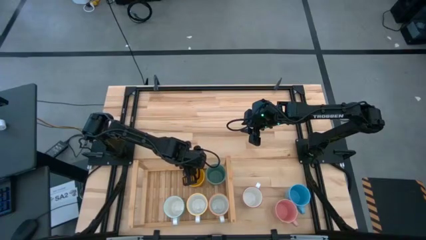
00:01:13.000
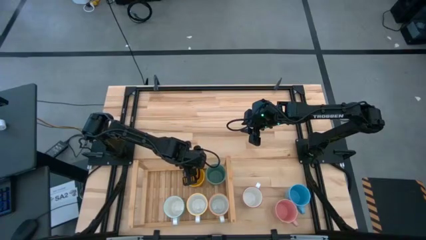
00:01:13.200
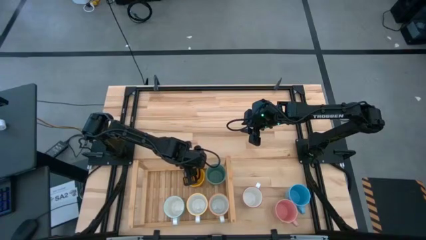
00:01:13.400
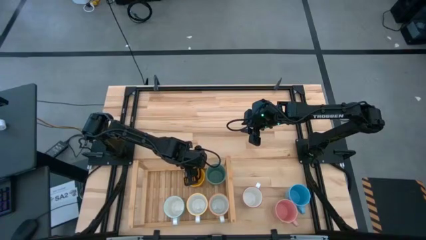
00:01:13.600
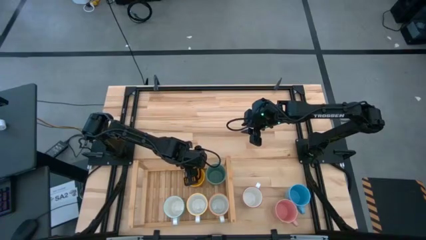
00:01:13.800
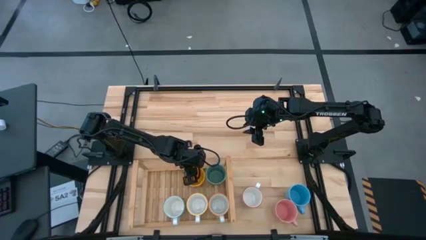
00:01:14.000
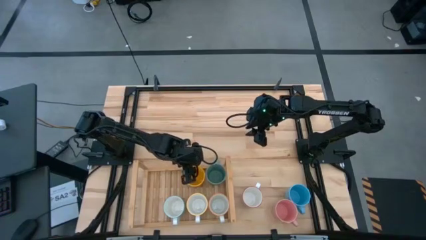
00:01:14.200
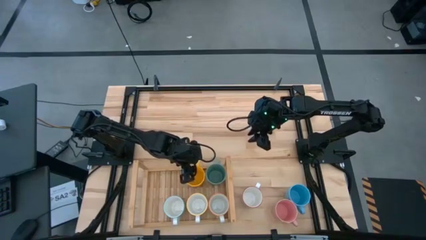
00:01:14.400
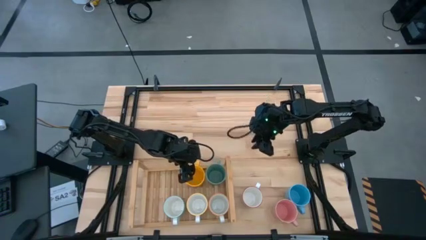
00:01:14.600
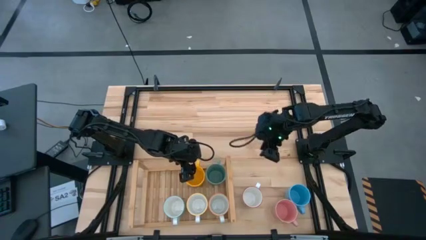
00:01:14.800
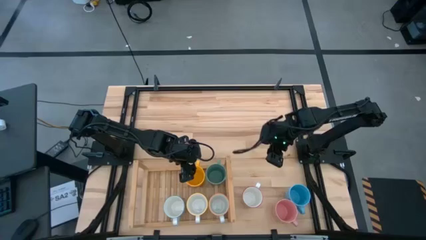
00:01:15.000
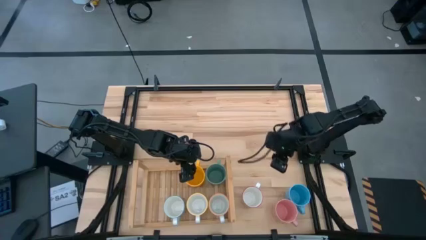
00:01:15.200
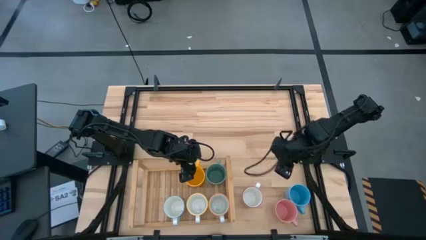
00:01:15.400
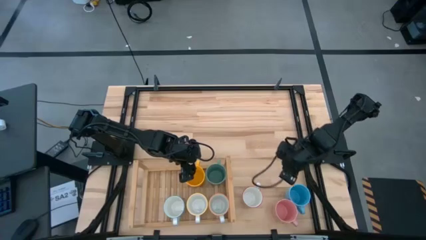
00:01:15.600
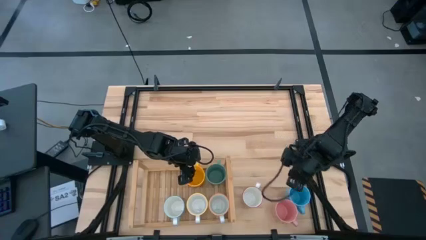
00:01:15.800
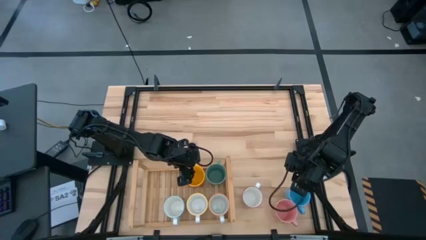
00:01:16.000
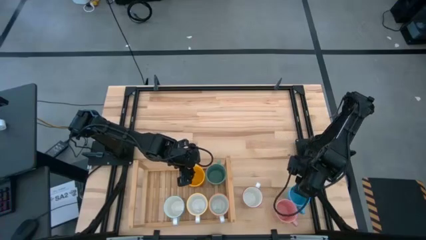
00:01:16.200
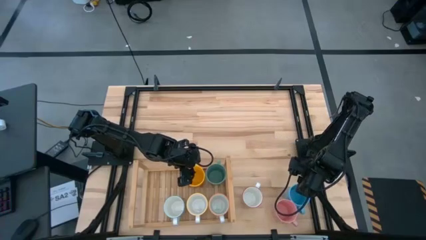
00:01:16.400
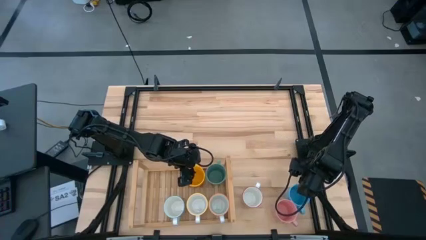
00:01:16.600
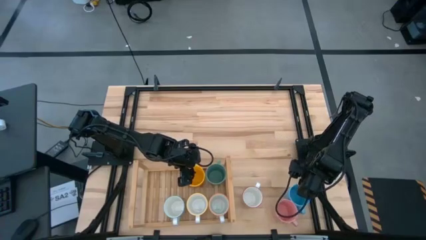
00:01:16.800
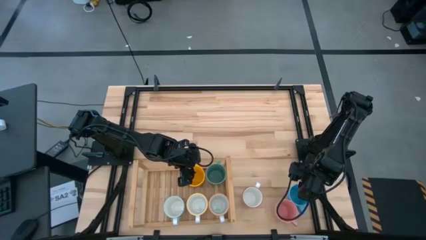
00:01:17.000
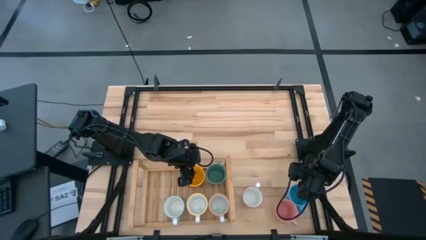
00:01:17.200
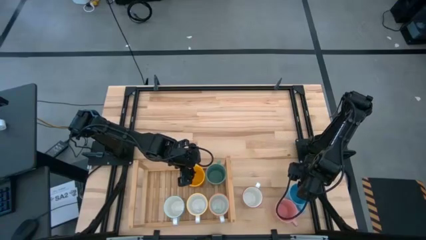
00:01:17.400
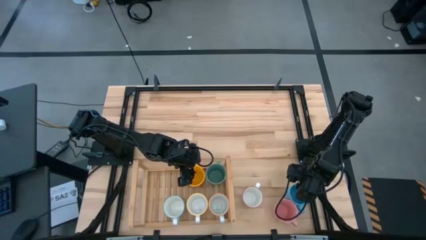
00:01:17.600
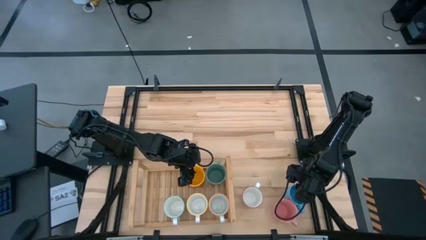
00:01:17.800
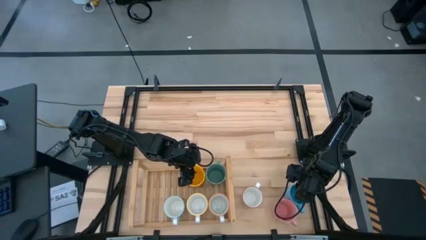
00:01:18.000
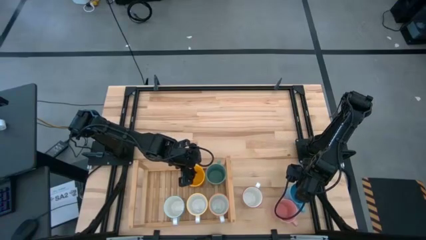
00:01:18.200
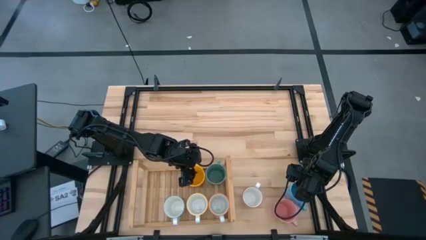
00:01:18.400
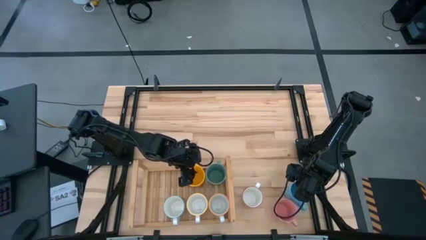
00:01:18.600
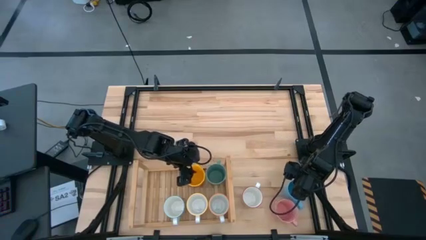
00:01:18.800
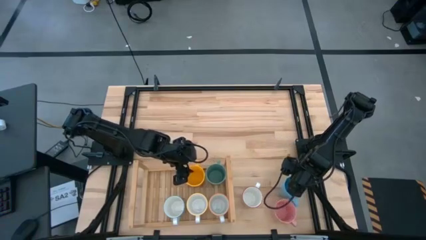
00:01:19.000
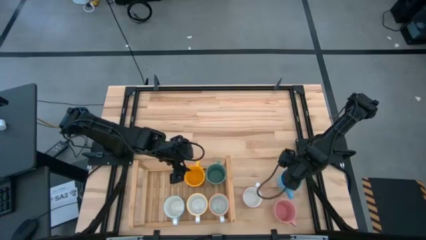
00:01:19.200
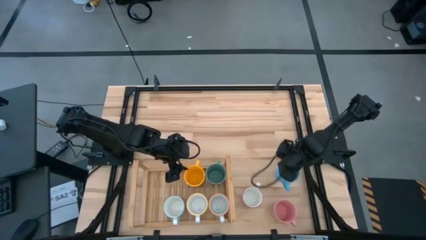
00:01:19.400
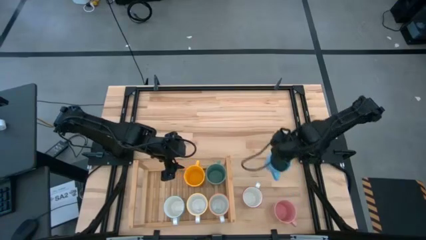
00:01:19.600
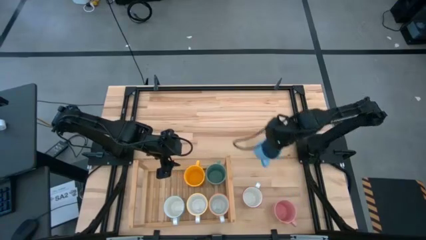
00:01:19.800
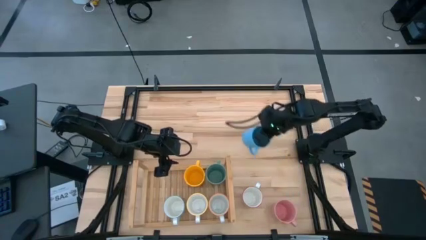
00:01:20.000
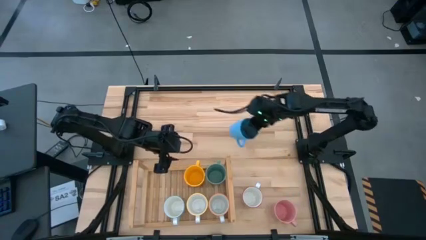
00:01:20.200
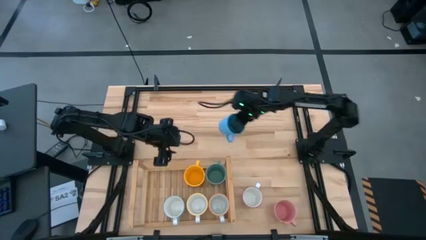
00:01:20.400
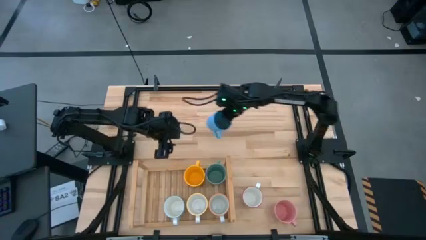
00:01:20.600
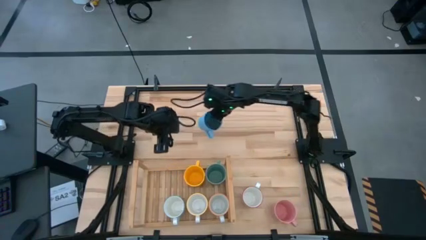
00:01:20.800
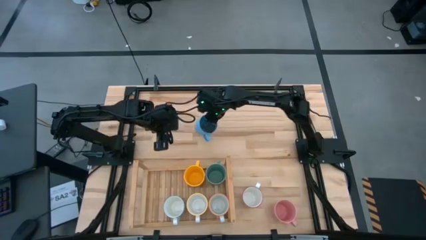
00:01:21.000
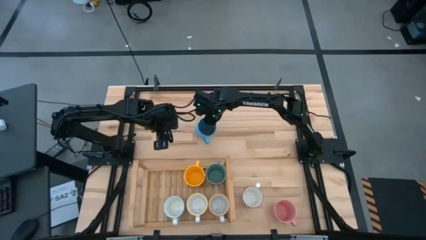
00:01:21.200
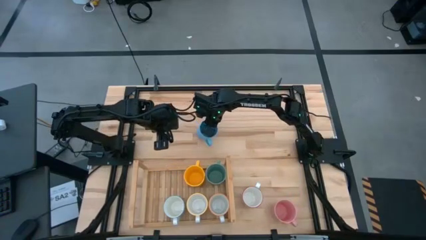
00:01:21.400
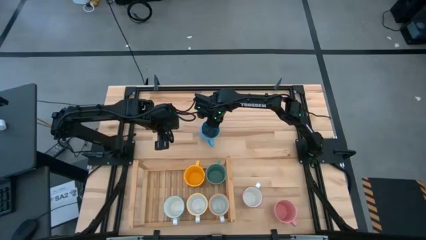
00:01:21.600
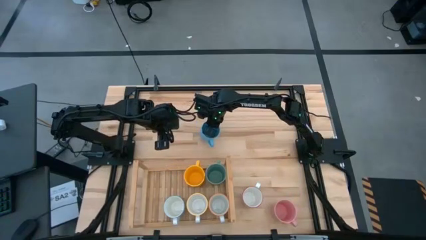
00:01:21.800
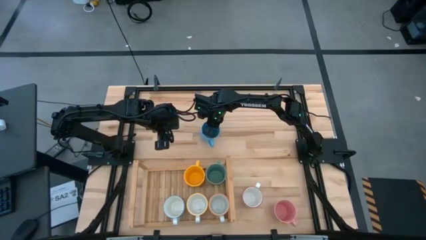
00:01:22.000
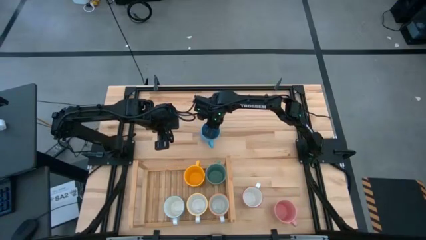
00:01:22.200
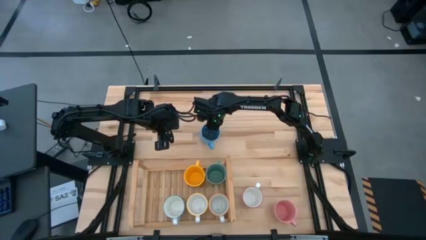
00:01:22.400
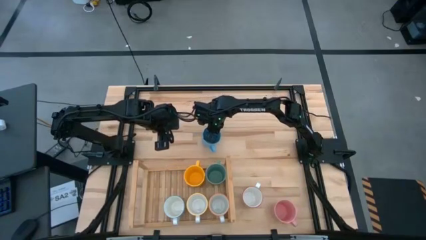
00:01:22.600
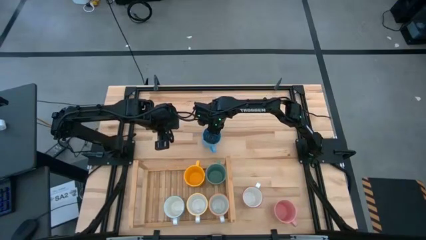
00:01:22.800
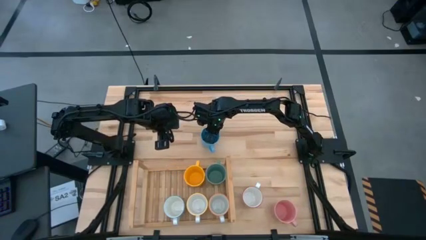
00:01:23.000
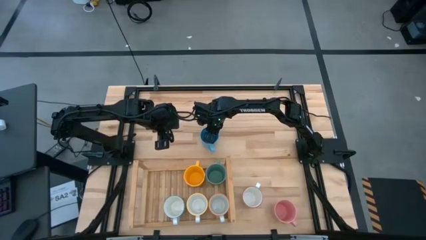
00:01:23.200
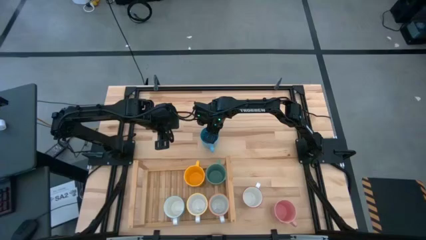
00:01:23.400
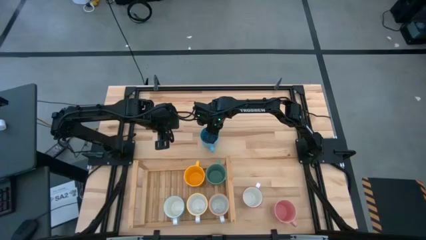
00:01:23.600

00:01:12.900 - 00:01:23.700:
Task: Place coffee mugs
Put the blue mug on the shelf

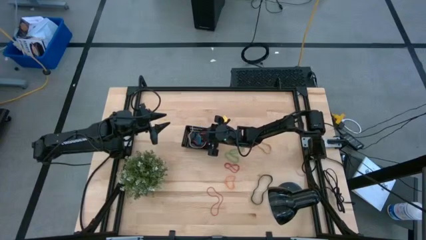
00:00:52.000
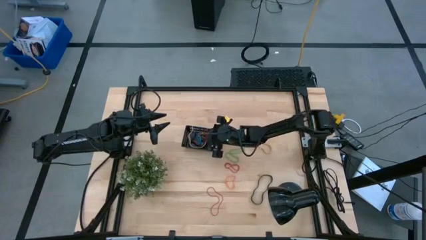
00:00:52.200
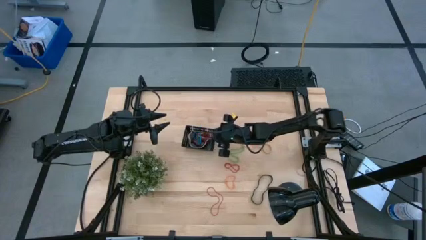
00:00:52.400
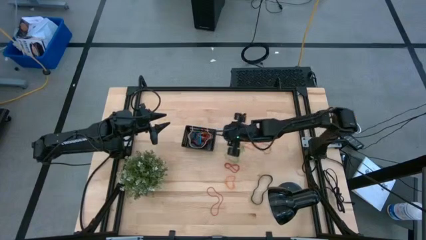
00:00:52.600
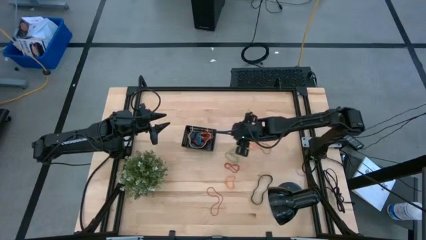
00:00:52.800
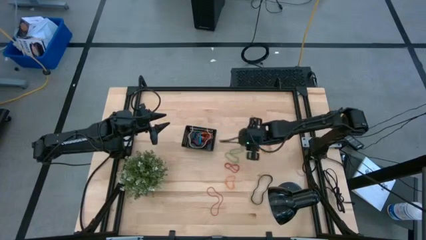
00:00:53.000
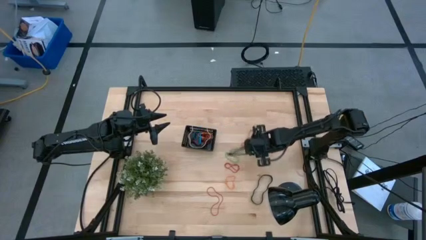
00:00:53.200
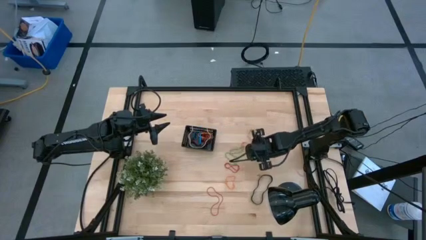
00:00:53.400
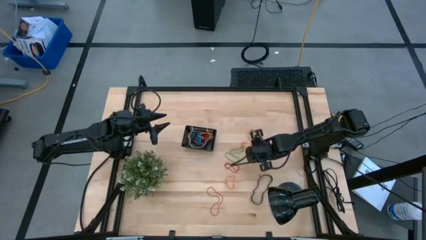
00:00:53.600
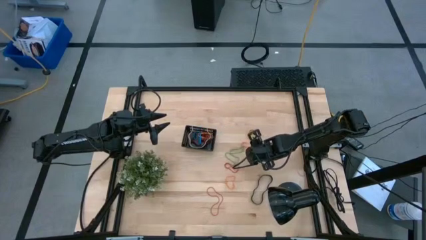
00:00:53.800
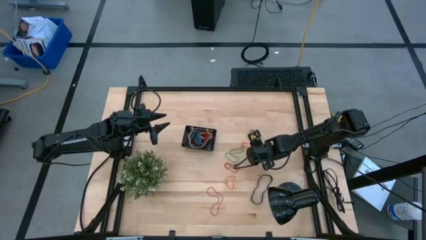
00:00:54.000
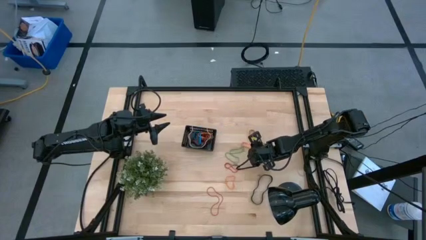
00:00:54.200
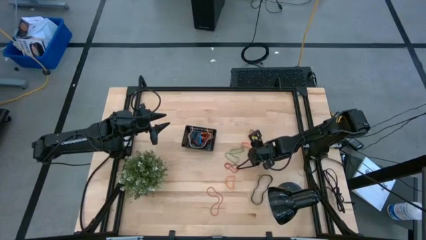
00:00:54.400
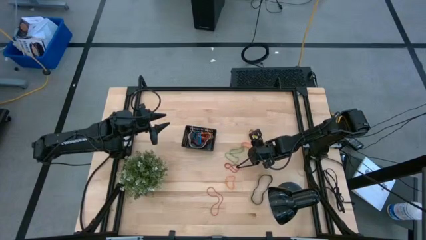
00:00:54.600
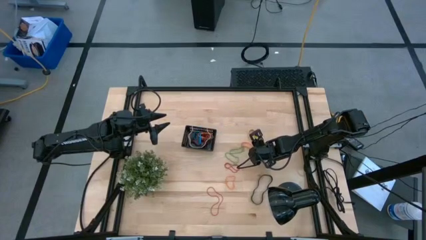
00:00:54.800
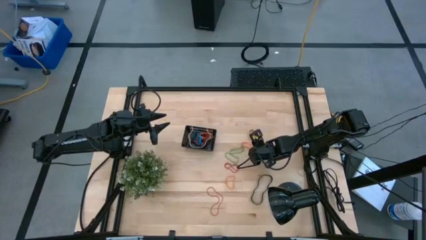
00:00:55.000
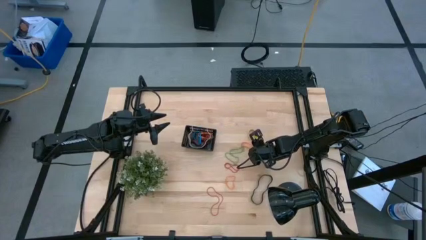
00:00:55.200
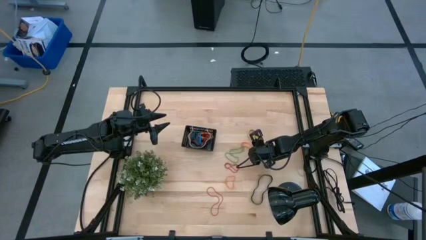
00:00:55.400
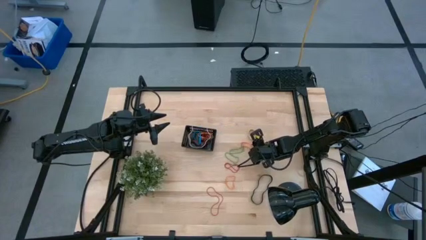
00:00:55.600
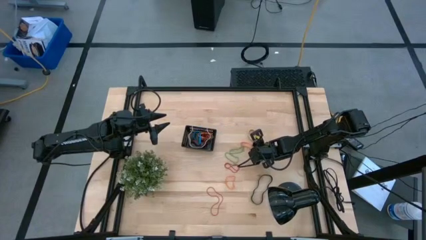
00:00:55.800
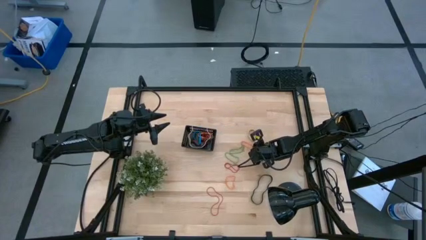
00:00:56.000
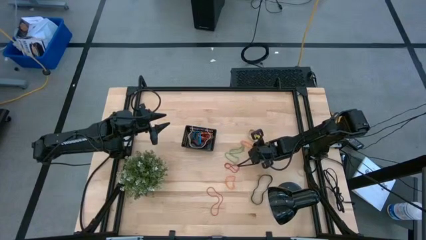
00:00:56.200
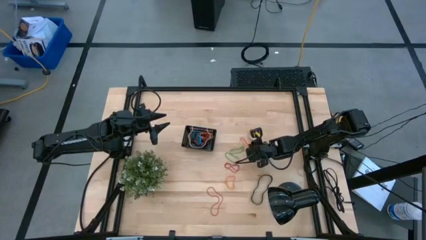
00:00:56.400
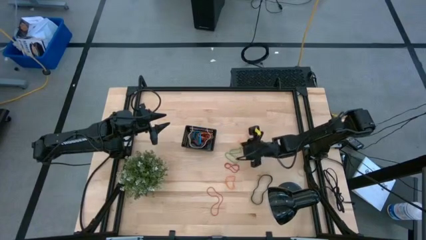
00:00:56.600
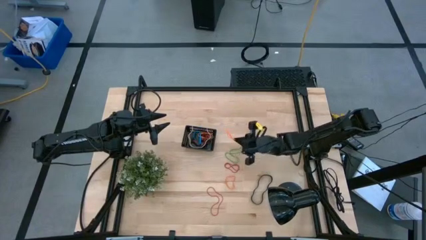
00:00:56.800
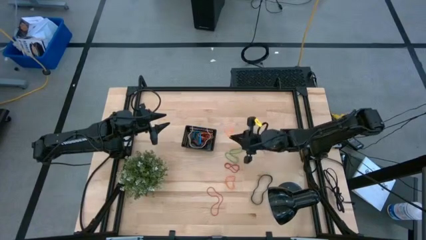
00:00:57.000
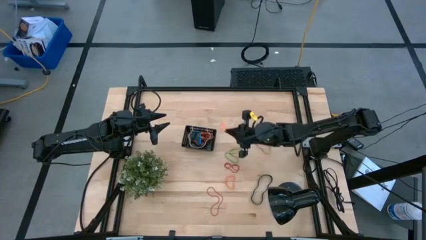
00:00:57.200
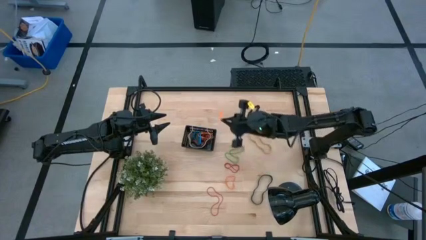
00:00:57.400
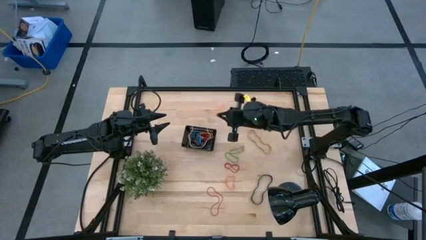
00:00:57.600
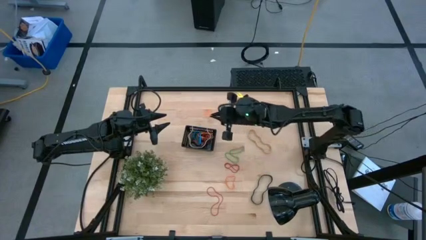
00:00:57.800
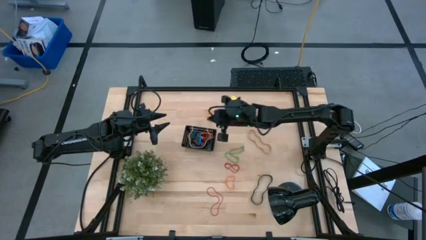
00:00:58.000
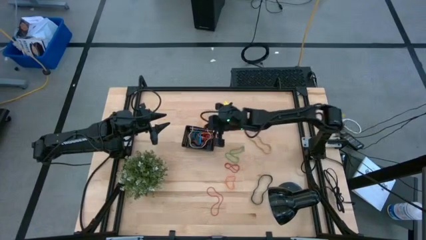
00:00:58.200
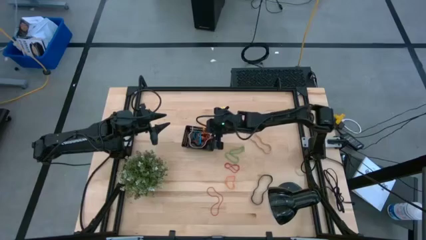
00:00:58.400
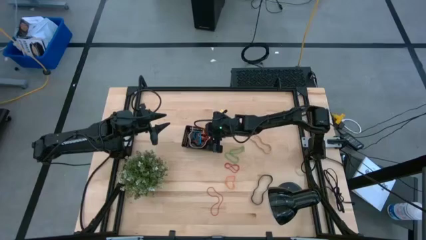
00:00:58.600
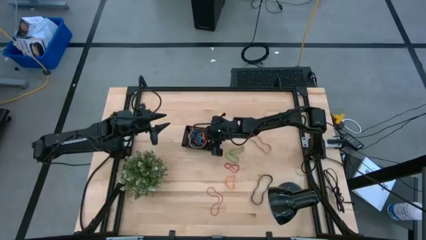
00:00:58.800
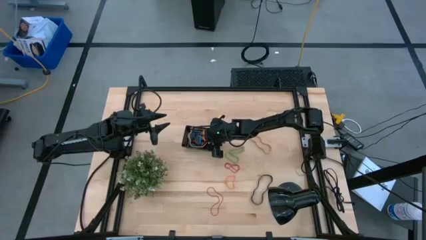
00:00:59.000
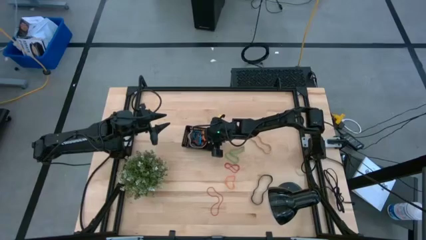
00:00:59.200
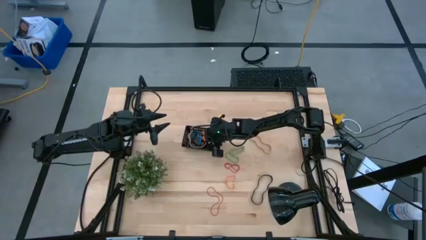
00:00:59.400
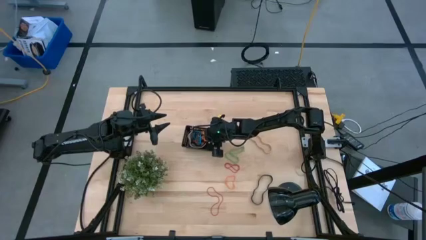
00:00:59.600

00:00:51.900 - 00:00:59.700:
Task: Pick and place rubber bands into bin
Put the top orange rubber band into the black bin
